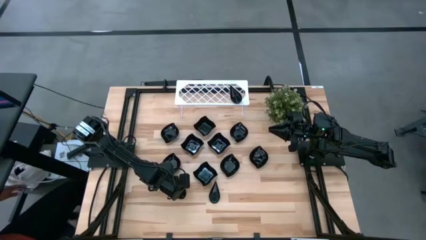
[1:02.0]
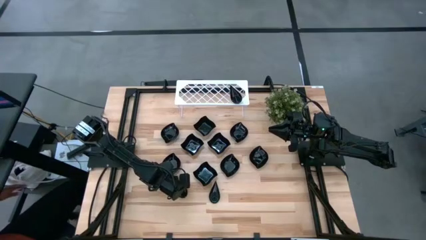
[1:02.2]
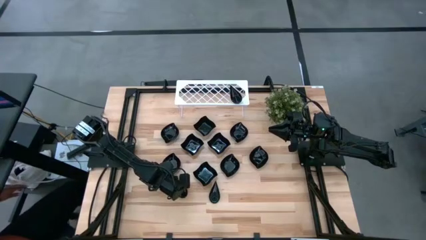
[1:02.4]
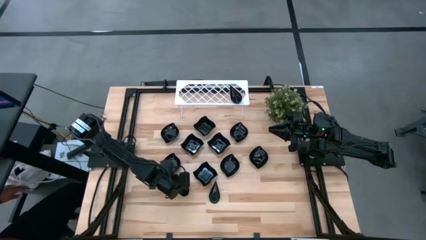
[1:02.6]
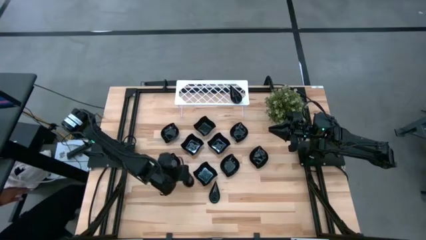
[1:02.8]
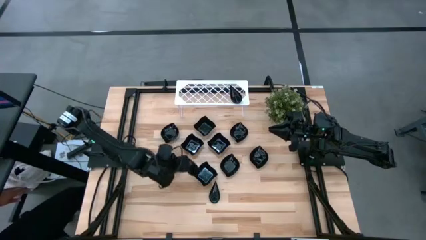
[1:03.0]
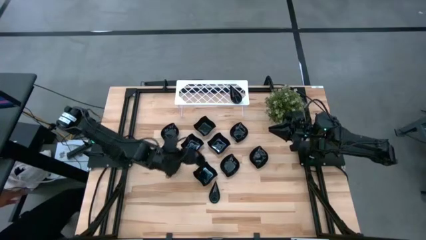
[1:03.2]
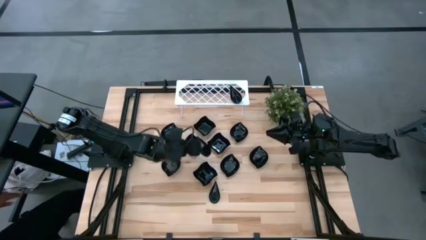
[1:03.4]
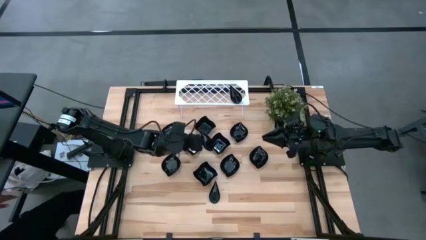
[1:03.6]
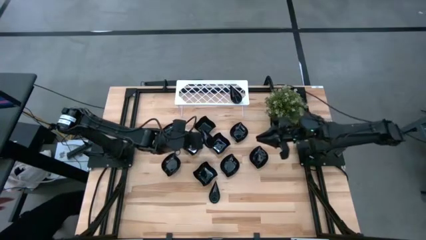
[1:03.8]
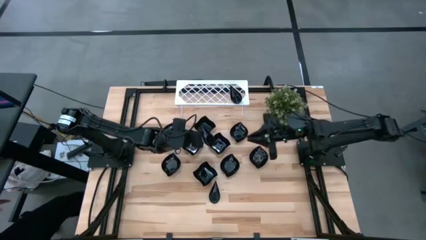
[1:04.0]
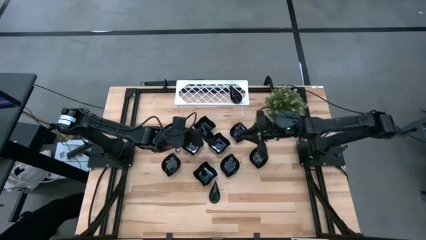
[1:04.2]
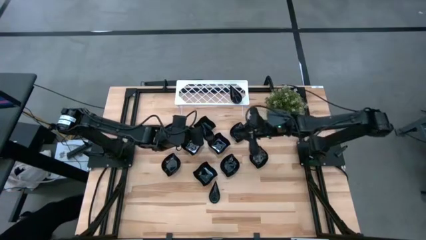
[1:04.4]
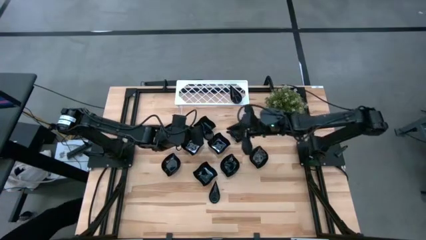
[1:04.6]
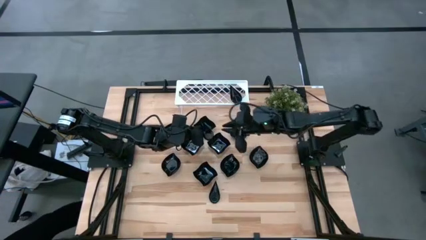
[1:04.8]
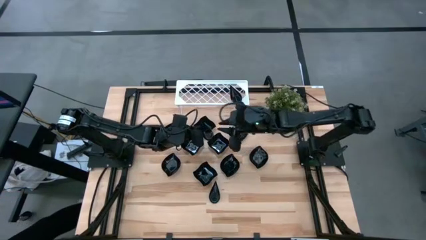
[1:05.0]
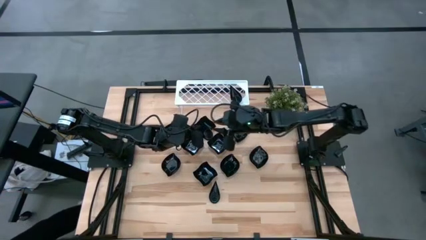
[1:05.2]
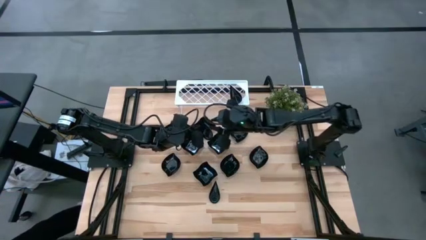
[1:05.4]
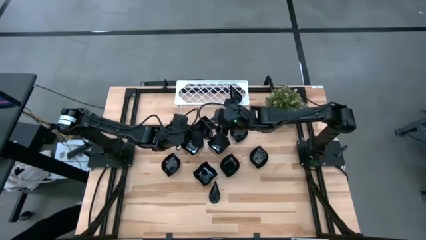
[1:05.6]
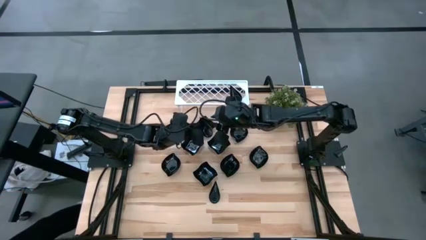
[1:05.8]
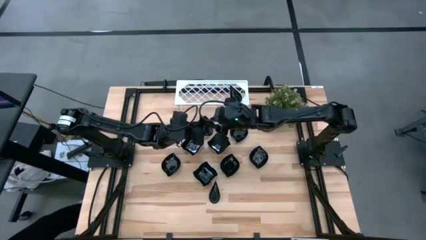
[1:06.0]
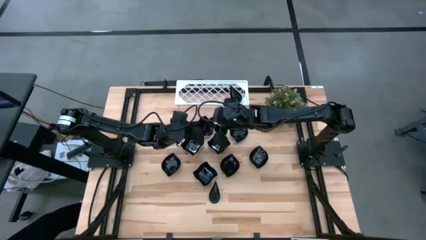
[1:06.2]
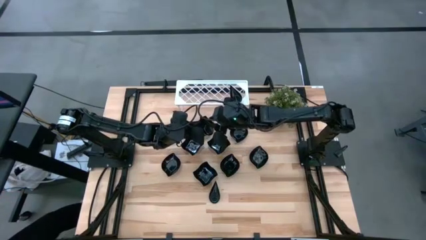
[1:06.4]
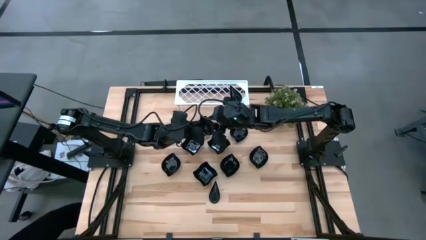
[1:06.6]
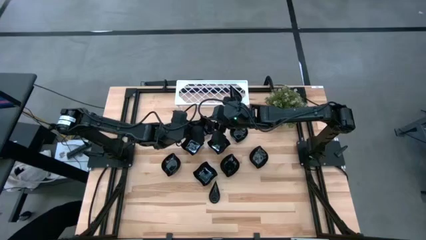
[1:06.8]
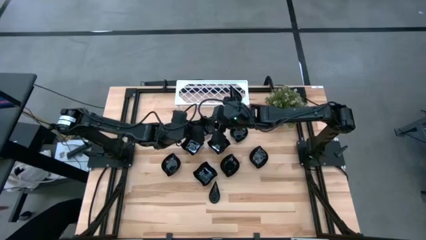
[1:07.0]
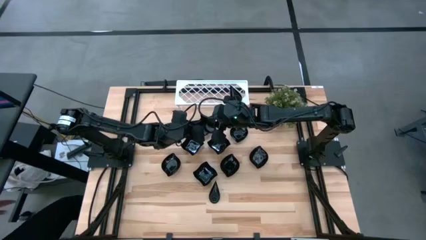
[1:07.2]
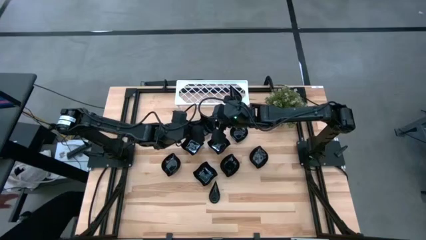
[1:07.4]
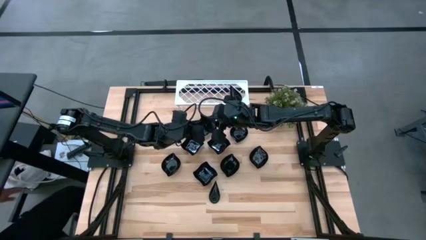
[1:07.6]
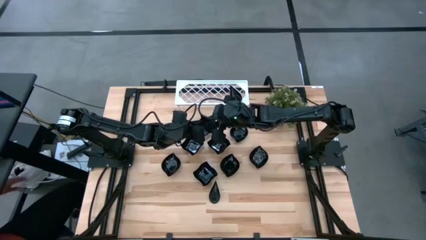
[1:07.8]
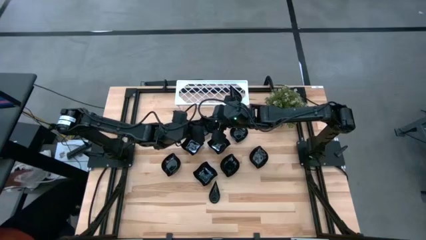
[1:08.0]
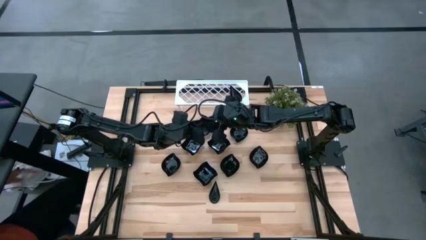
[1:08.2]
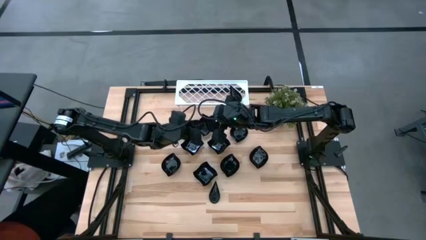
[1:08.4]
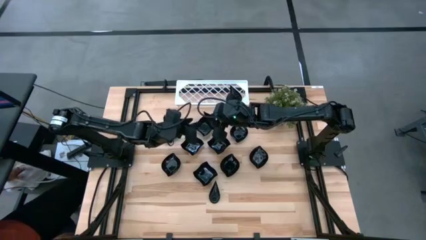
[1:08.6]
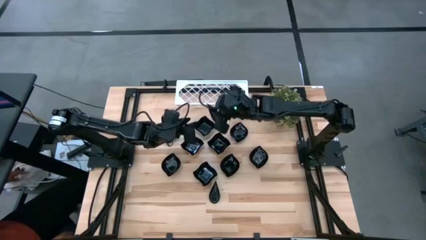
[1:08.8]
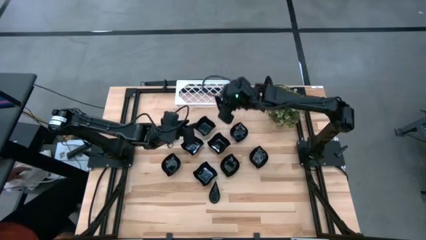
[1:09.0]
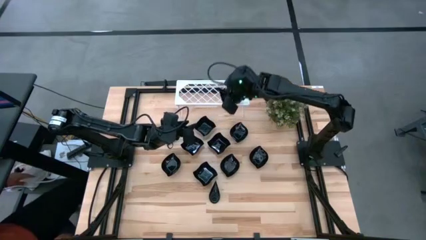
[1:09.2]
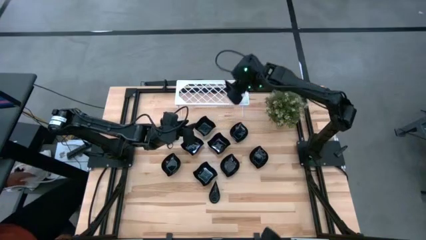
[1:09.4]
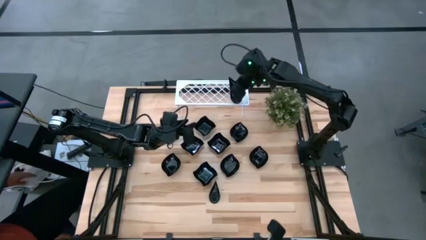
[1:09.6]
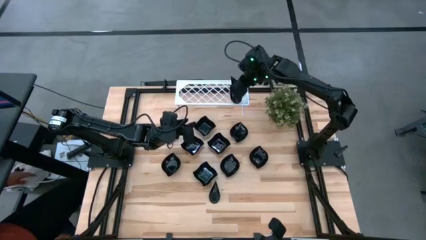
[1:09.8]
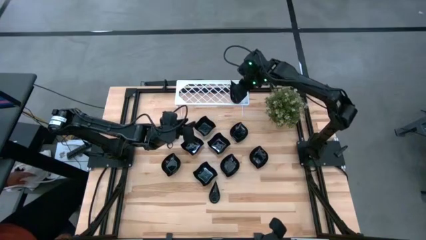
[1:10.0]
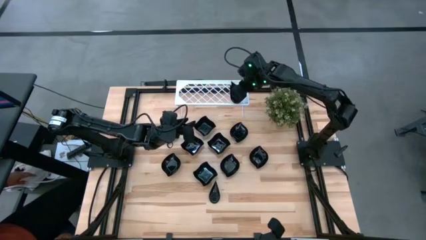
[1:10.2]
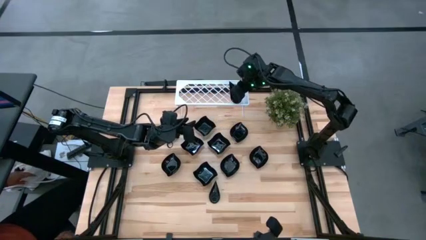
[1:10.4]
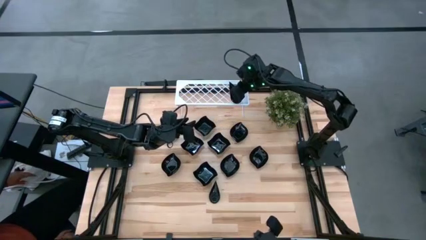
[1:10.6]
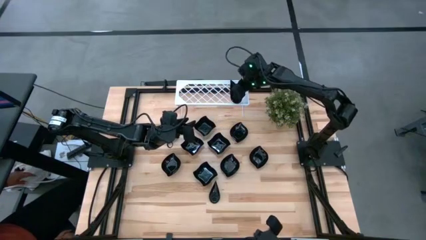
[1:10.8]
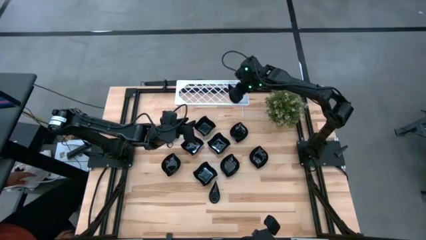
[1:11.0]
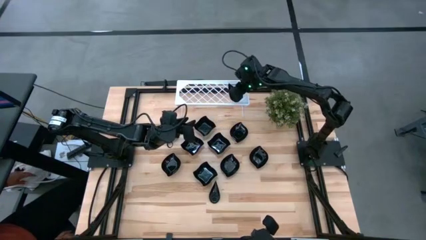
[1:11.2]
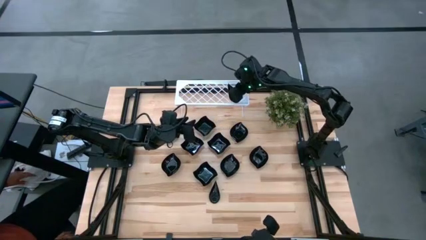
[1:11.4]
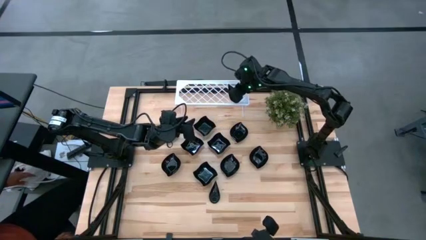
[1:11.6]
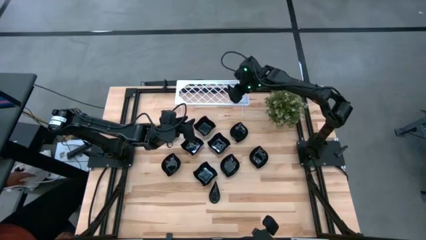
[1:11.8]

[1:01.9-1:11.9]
Task: Pick & Place Mini shaped plates
Stack the drop-shaped plate on top of the other drop-shaped plates on the shelf

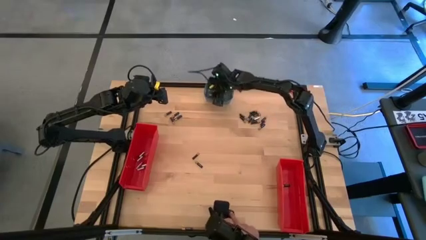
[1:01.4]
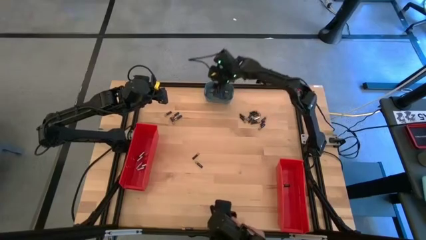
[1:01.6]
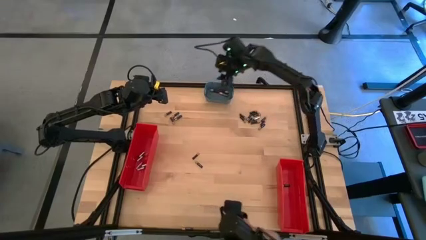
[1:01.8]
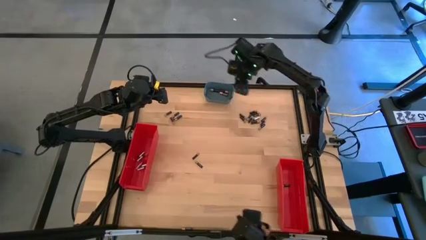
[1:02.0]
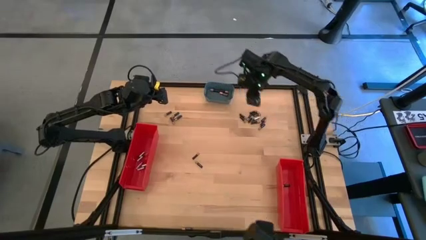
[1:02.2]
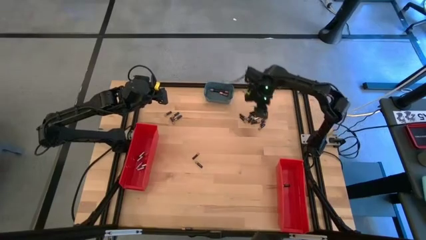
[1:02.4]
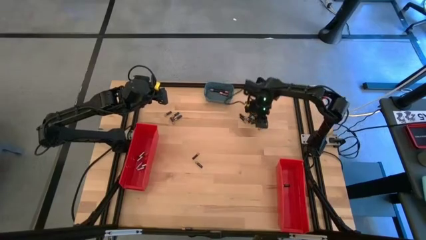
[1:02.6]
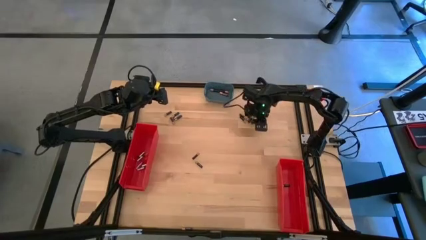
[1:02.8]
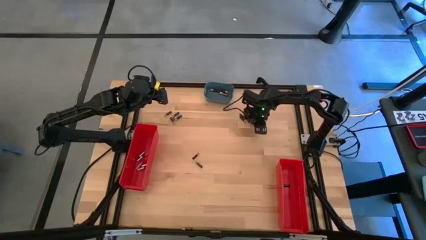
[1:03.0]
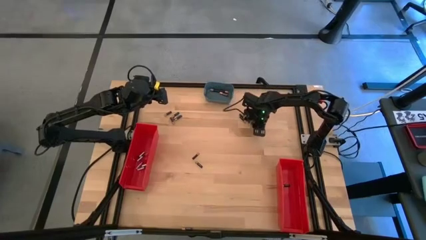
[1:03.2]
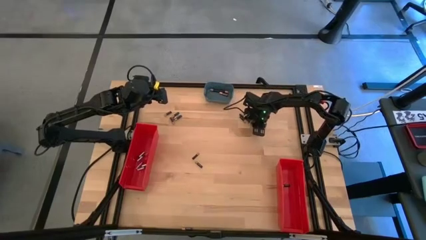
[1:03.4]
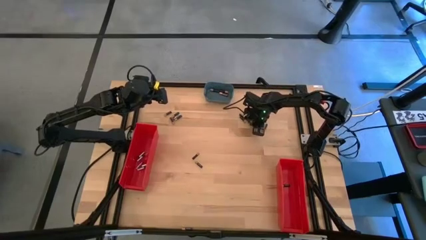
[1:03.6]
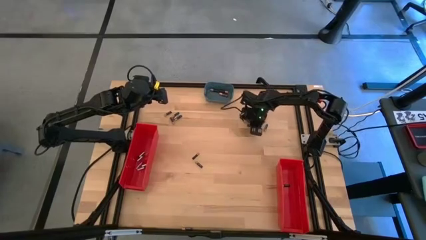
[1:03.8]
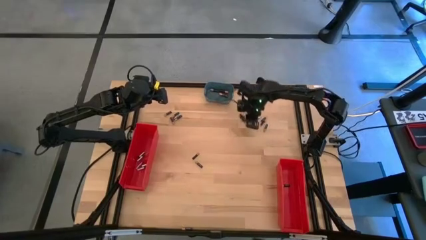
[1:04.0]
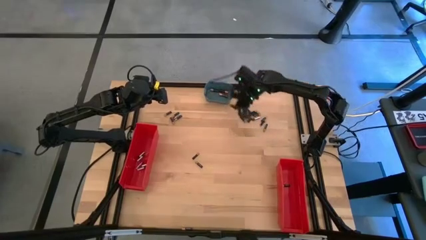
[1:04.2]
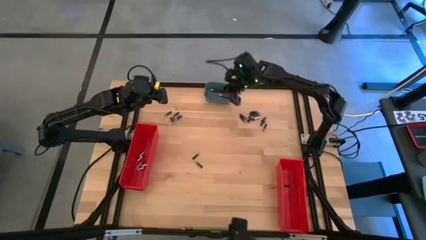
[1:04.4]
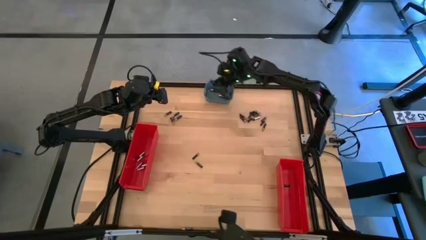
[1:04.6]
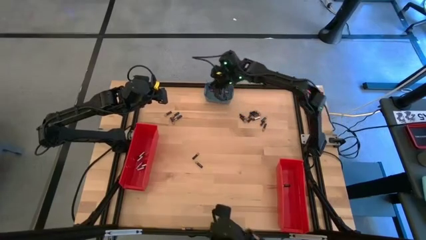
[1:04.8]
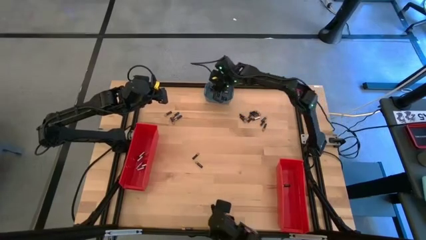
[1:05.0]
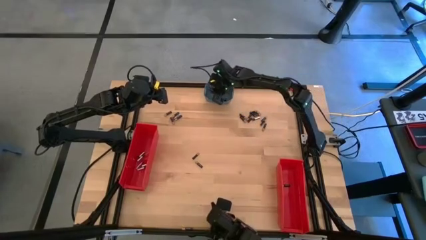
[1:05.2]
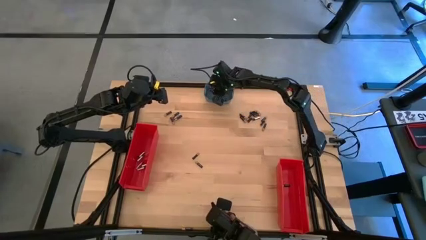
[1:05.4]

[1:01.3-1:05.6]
Task: Sort batteries
Put the big brown battery into the blue bin

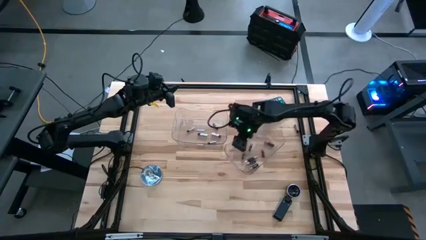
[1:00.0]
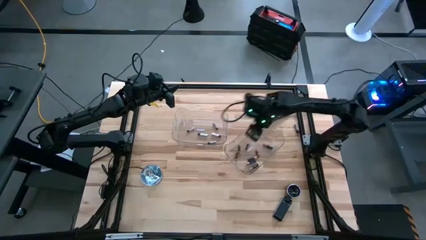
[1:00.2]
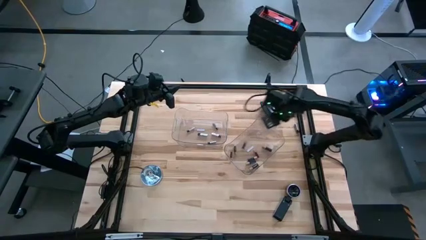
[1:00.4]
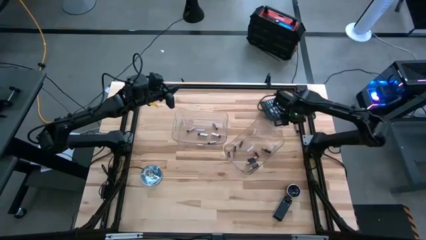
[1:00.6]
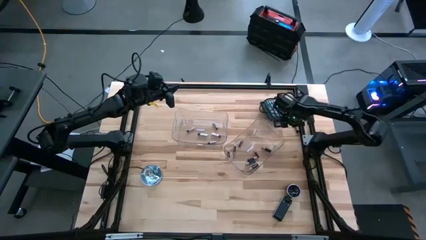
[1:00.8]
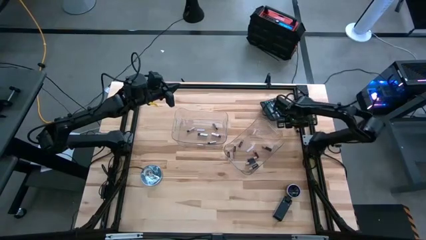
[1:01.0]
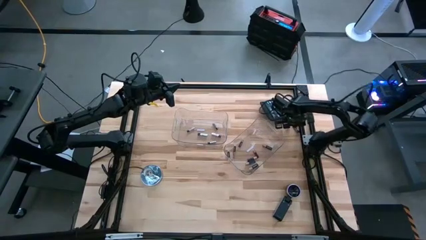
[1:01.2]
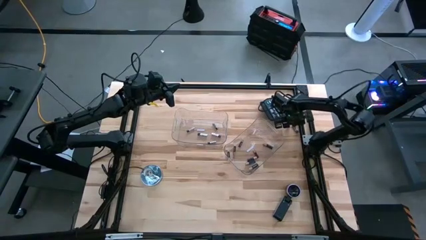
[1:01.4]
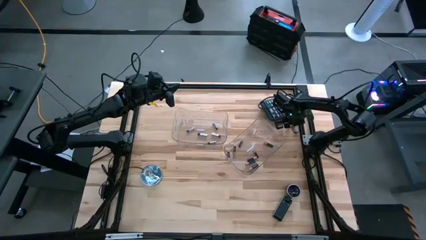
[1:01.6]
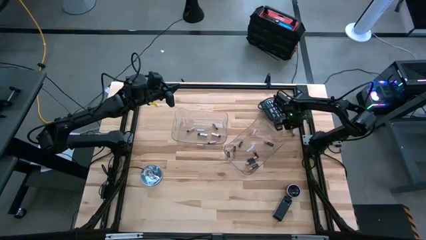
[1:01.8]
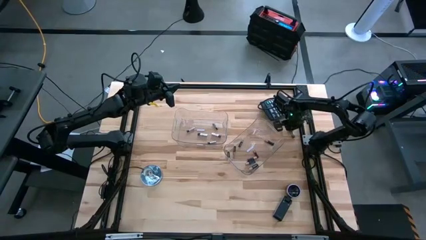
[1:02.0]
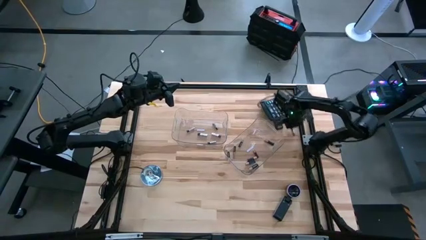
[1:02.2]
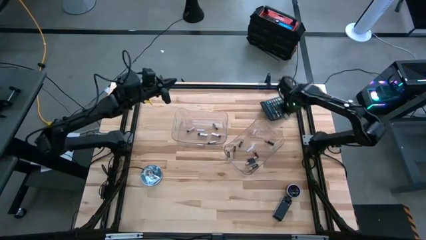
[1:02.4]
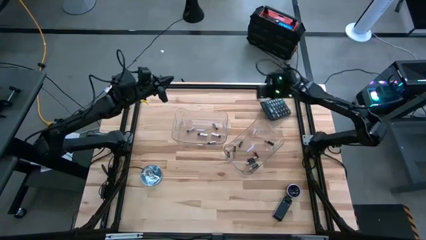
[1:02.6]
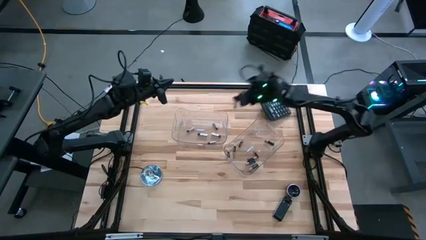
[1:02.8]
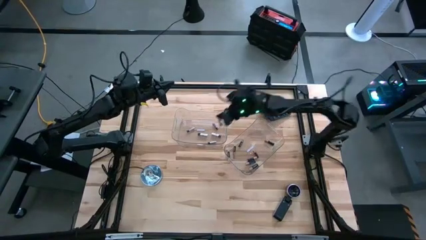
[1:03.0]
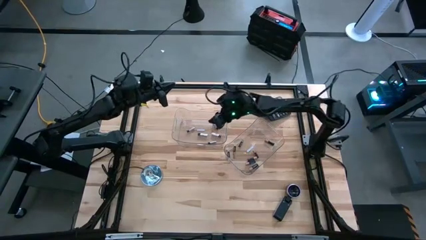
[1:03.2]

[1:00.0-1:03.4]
Task: Sort batteries
Put the silver battery into the left transparent bin
